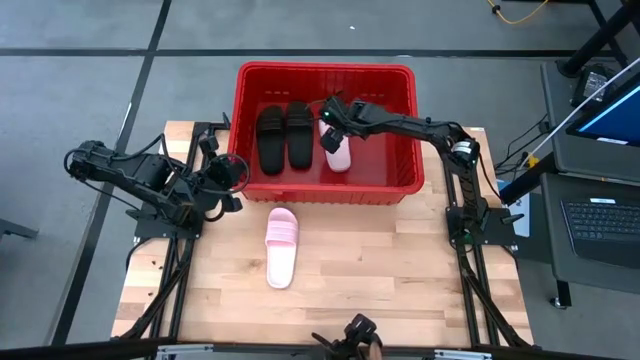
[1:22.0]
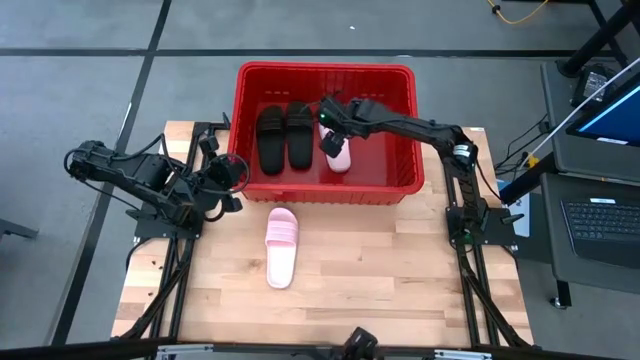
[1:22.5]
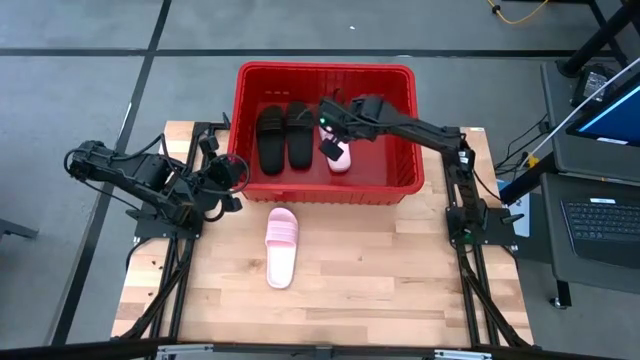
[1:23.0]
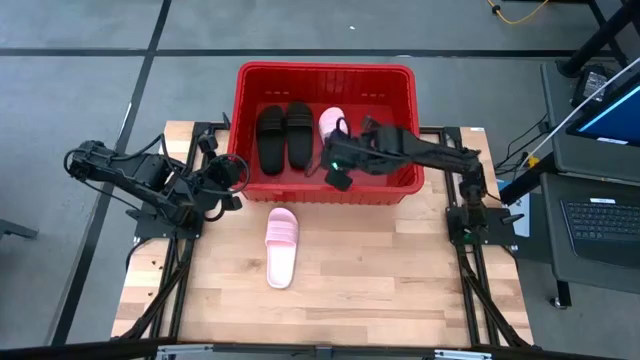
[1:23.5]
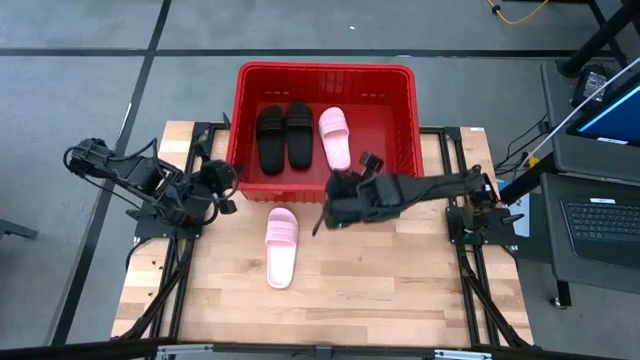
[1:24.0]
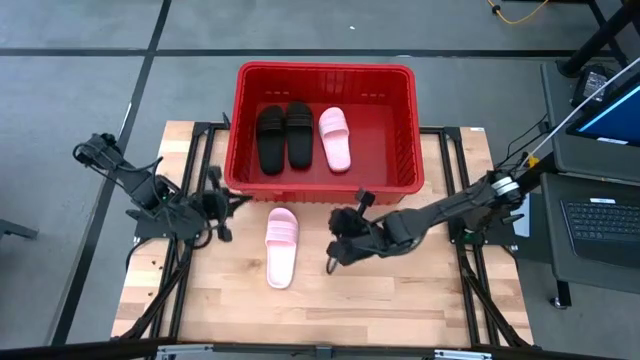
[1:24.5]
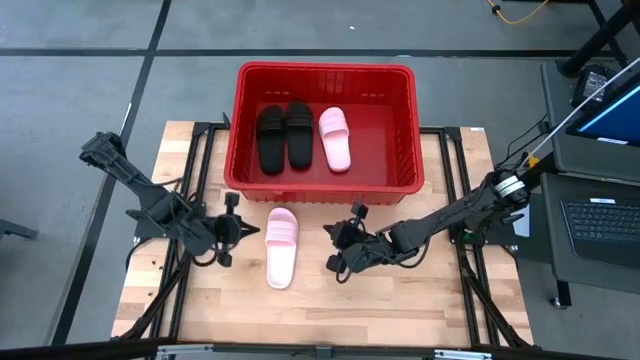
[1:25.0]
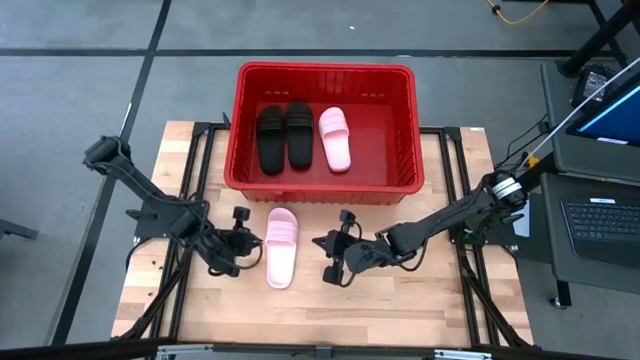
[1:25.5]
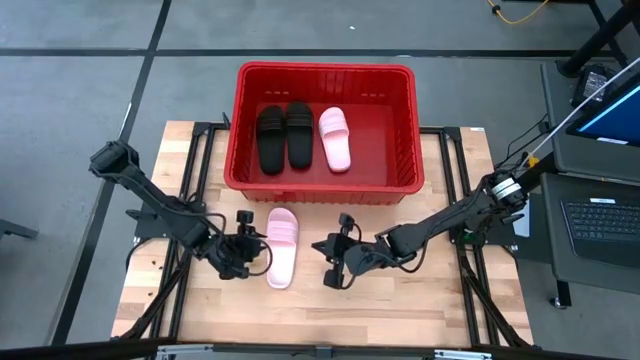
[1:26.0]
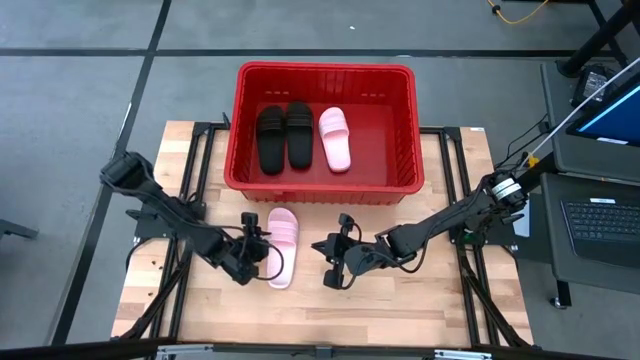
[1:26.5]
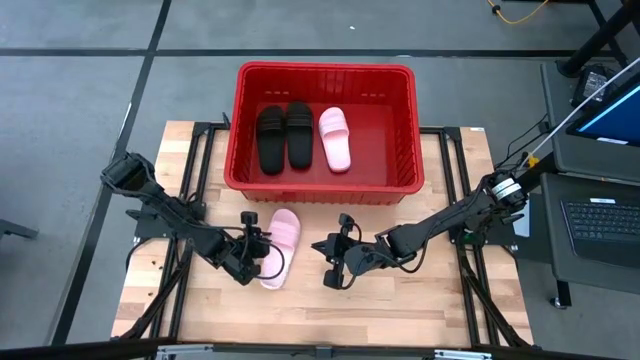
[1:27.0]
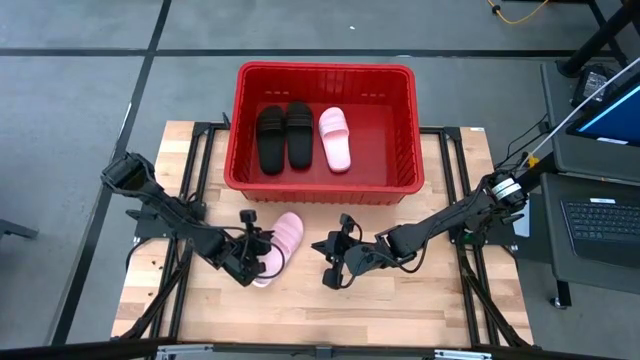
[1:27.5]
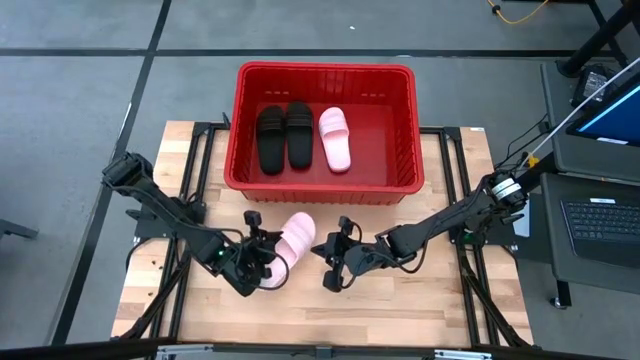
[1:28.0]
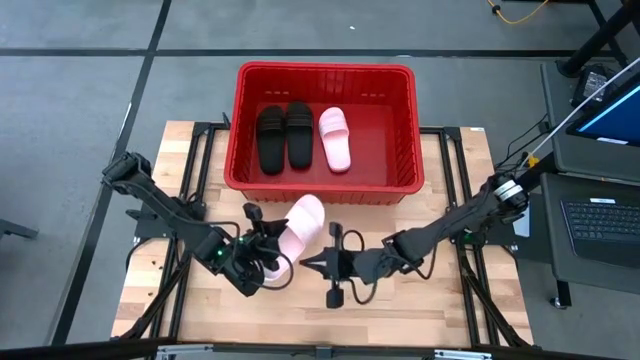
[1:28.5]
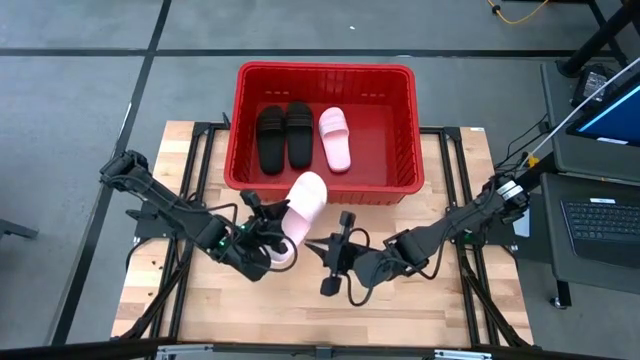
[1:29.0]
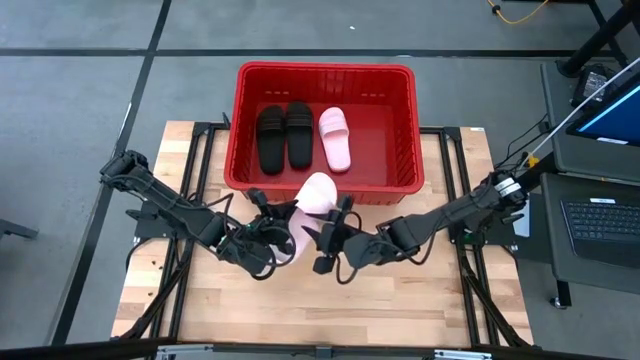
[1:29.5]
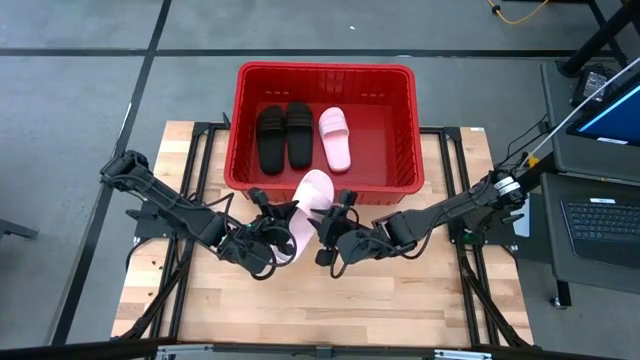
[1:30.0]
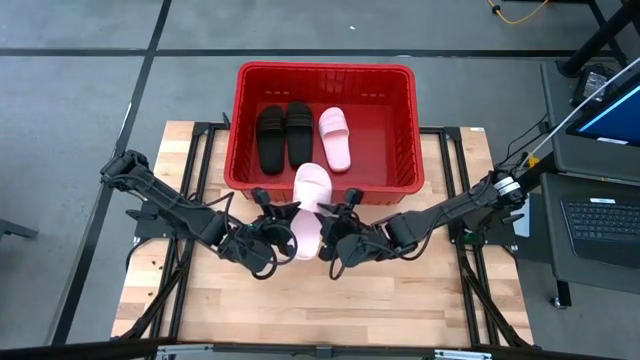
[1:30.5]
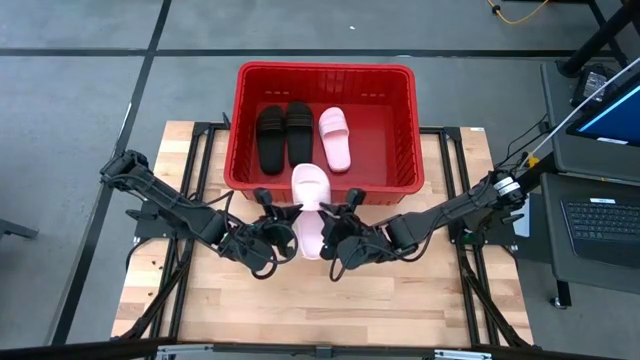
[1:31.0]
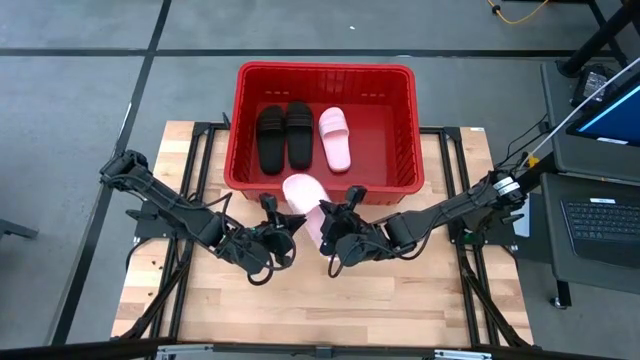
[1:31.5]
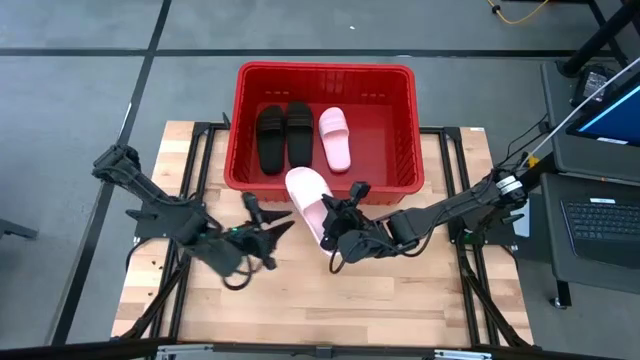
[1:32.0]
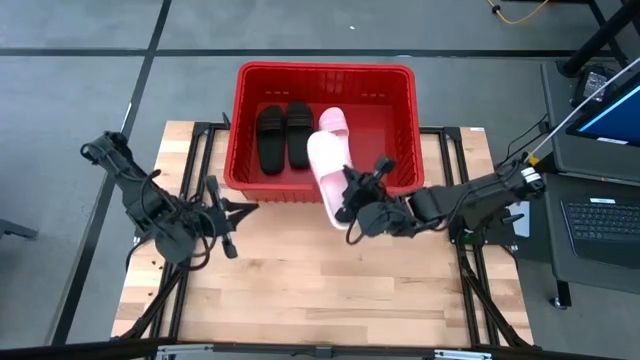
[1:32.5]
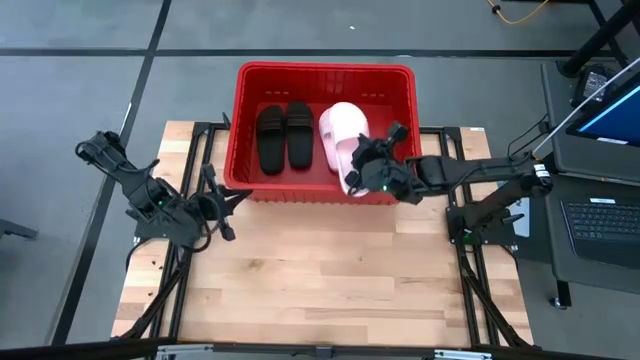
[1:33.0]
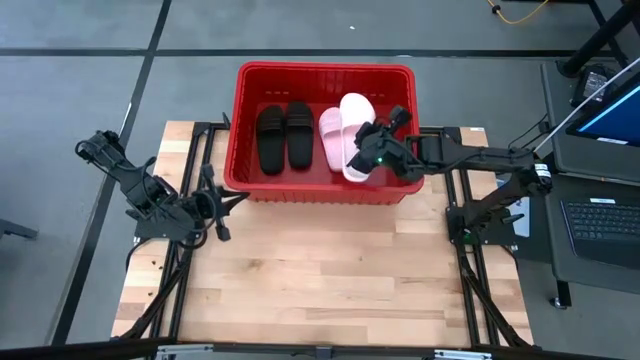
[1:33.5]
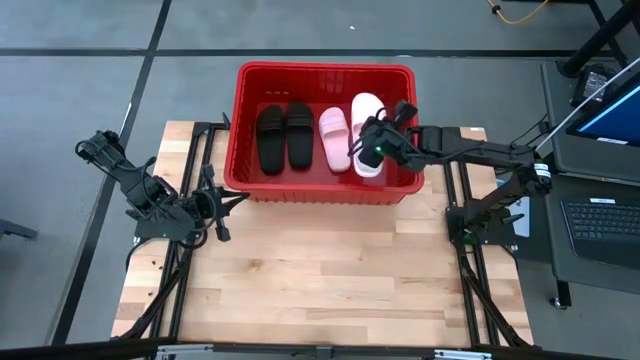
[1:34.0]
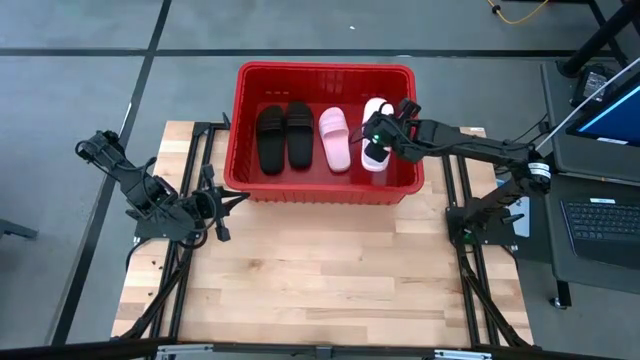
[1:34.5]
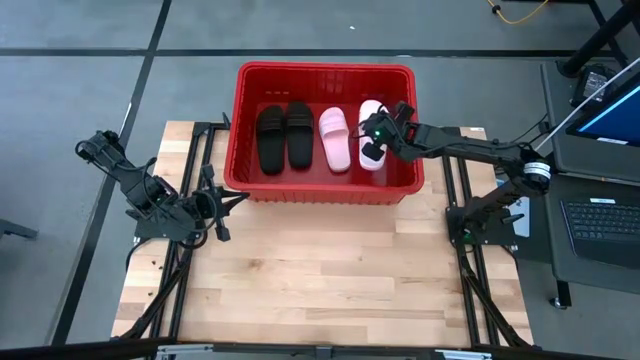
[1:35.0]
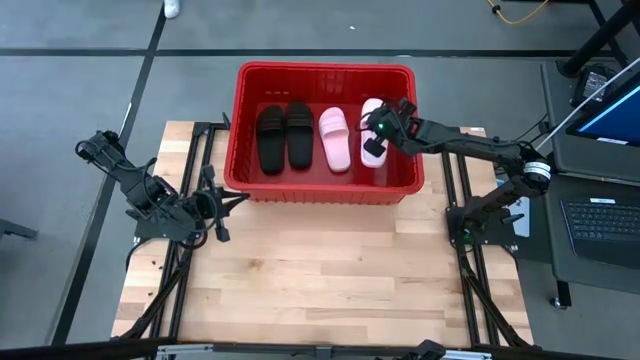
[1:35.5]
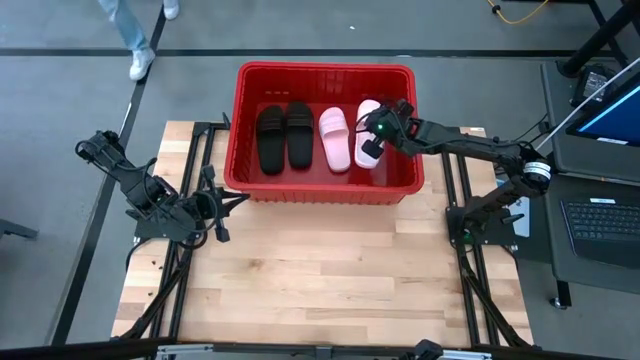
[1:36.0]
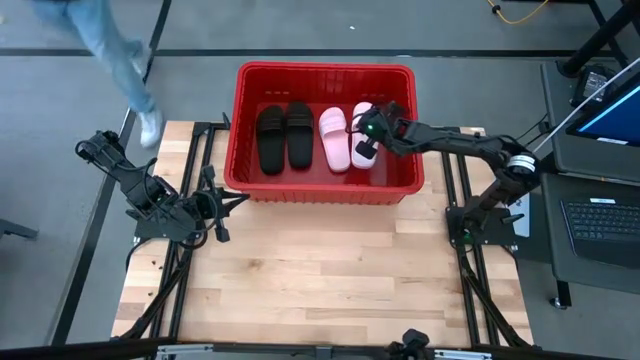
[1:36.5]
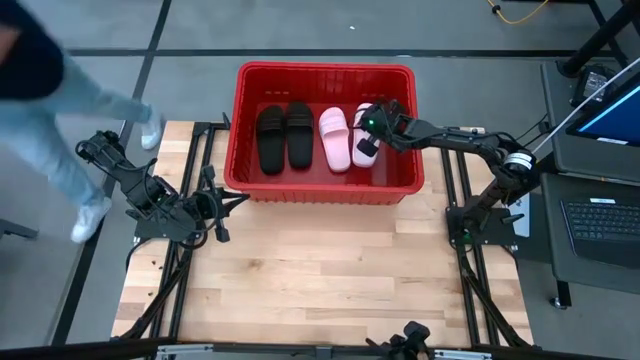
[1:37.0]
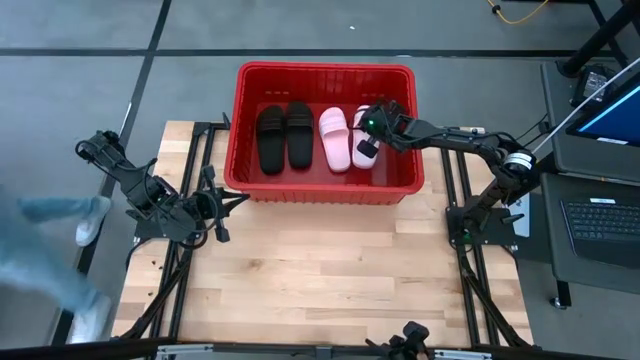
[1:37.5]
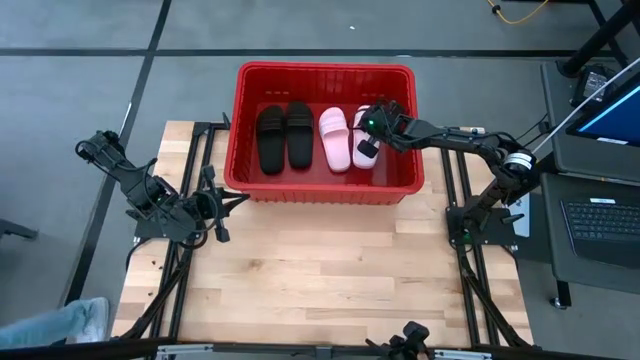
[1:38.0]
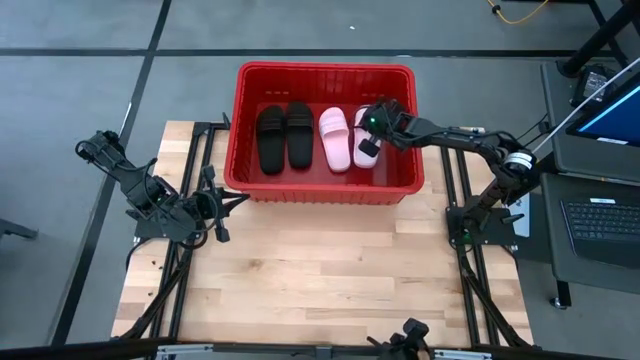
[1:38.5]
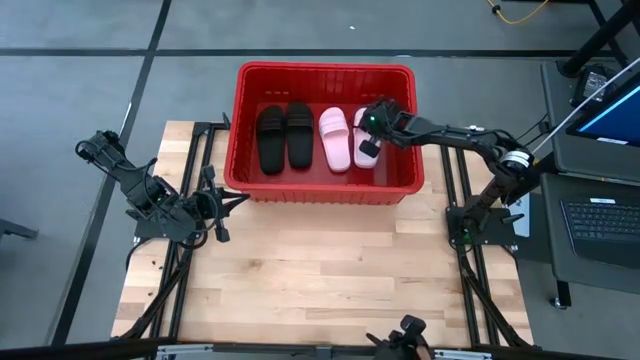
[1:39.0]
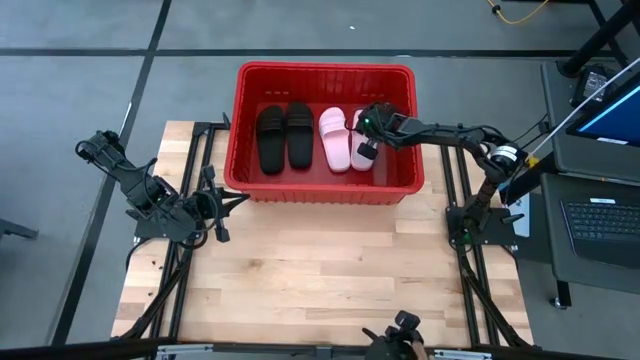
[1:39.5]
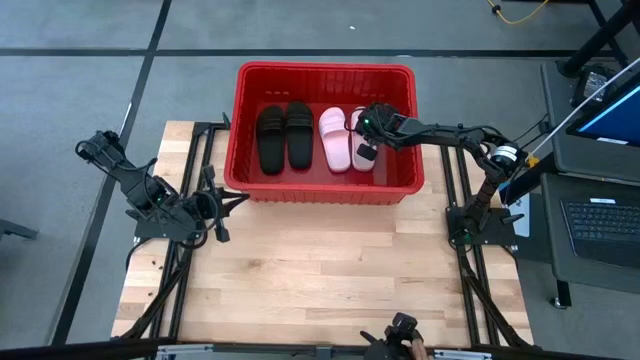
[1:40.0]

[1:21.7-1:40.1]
Task: Pick and place slides into bin
Put the pink slipper into the red bin
